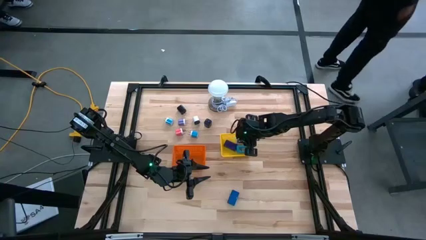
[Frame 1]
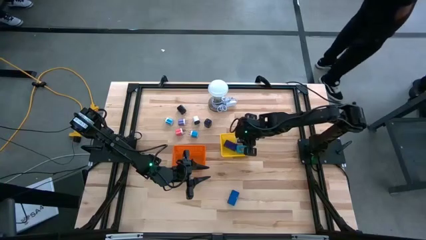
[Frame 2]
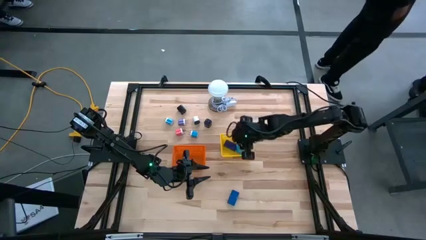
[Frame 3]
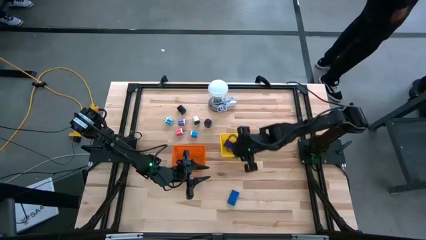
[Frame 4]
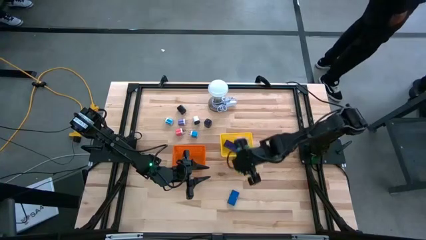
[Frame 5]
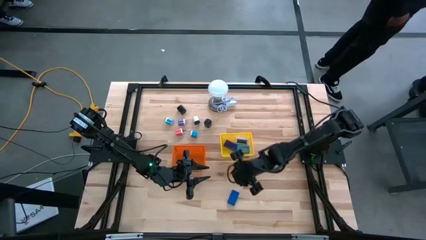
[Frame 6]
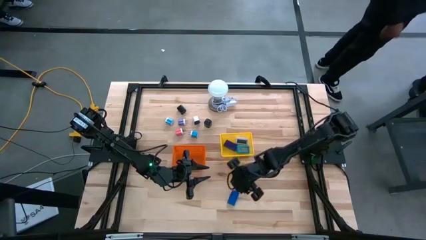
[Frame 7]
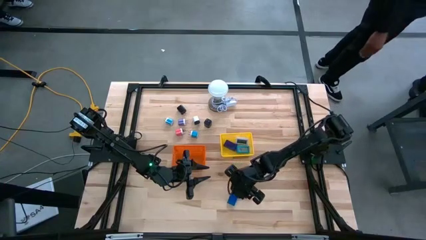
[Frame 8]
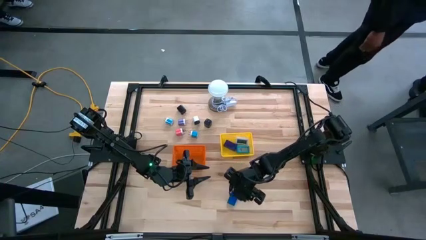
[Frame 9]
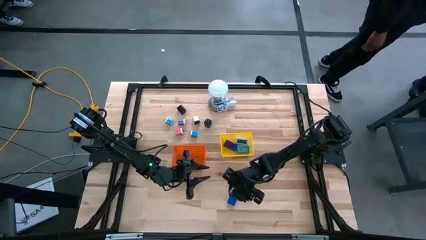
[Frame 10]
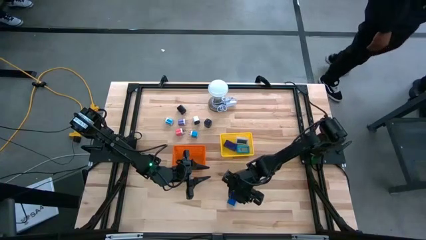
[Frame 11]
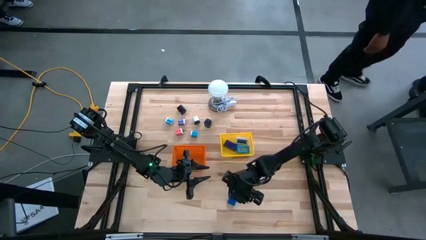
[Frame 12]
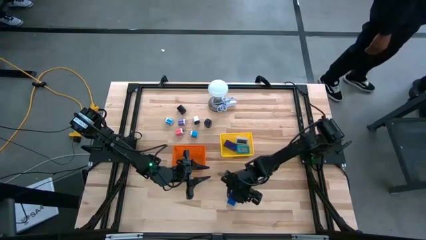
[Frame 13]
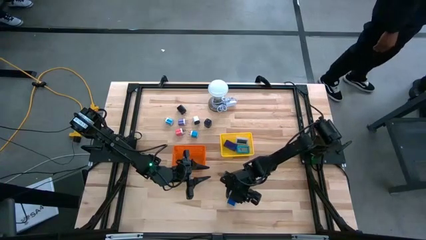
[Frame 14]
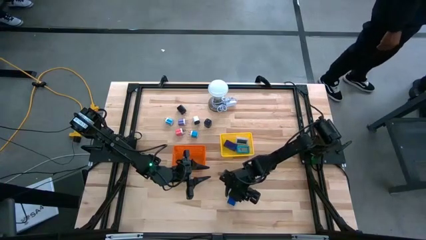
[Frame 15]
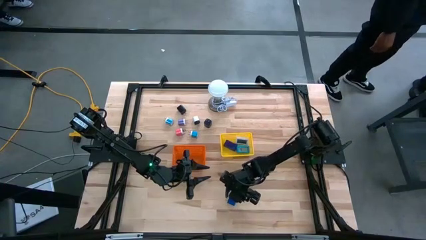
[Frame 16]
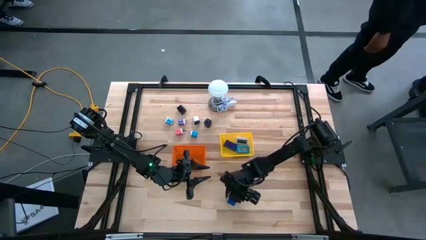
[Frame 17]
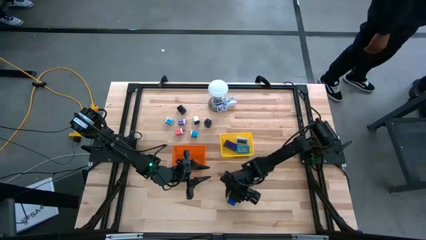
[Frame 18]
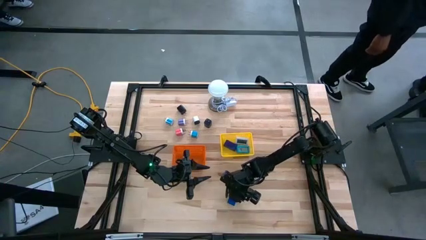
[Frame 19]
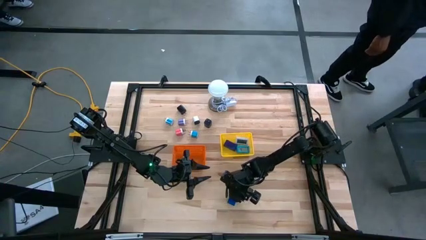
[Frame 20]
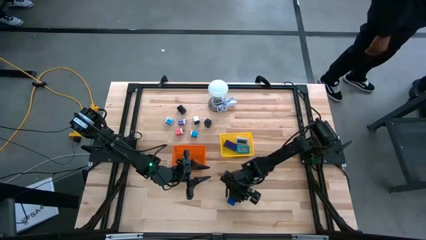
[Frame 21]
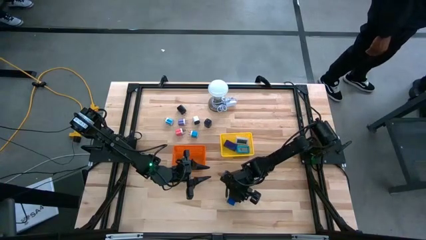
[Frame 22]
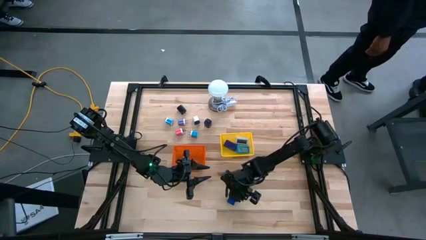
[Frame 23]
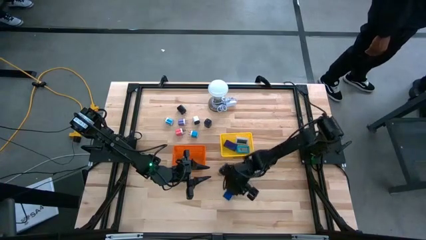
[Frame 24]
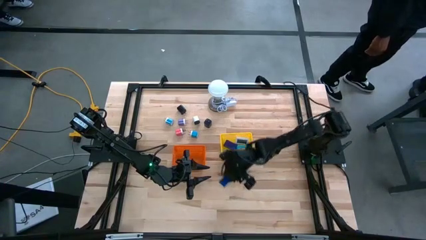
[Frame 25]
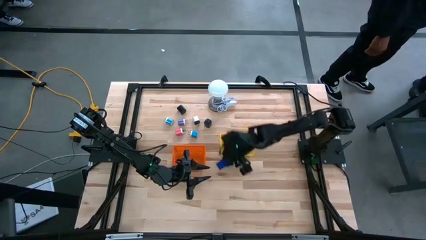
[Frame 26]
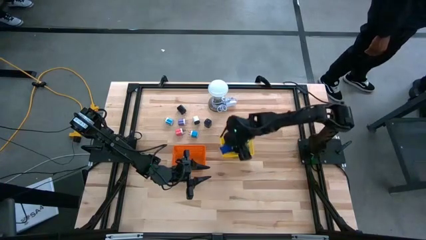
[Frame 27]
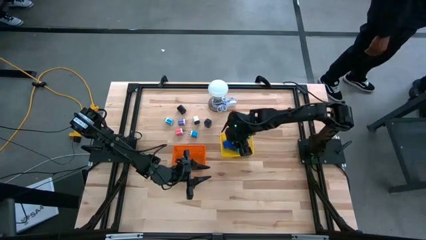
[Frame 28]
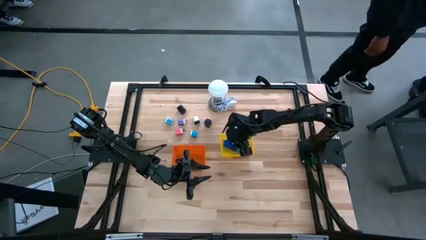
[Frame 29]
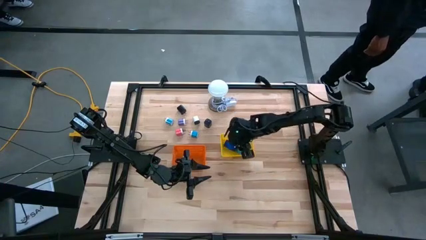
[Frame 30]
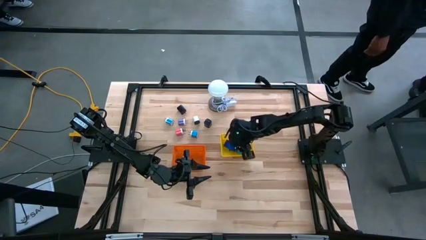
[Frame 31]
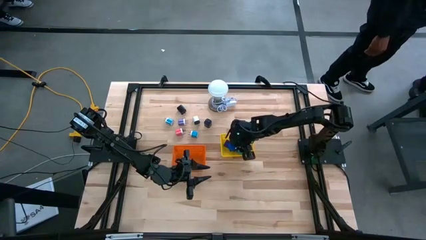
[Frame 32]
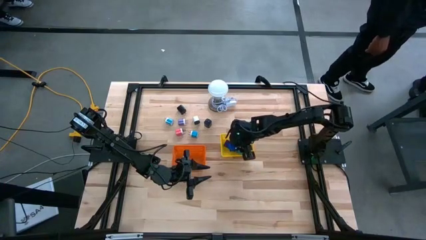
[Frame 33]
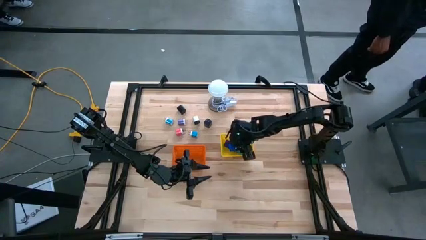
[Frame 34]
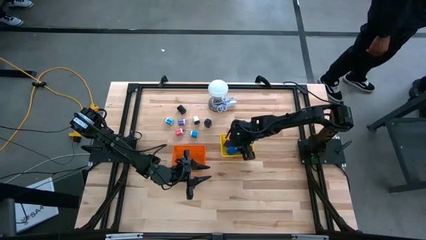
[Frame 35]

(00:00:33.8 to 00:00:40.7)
Task: Pick & Place Office items
Put the blue digital clock into the yellow bin

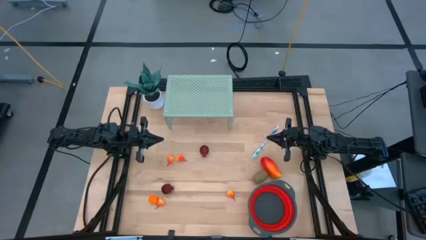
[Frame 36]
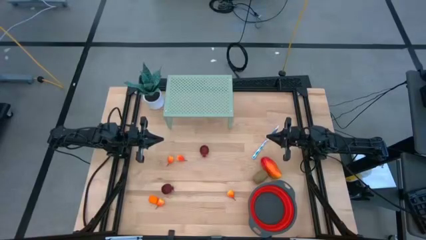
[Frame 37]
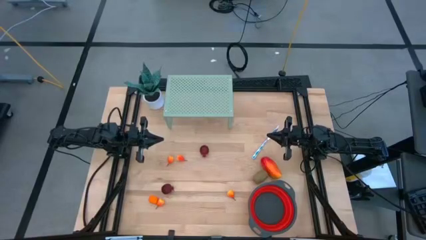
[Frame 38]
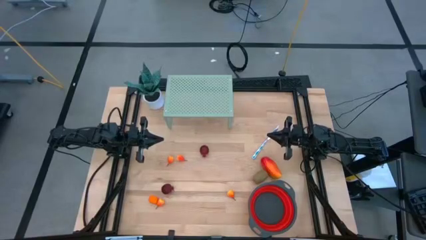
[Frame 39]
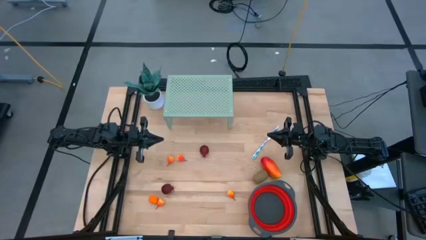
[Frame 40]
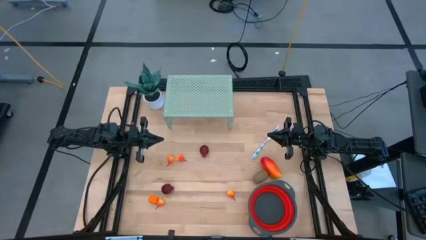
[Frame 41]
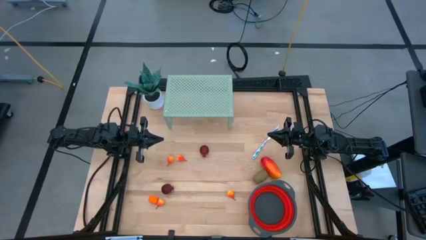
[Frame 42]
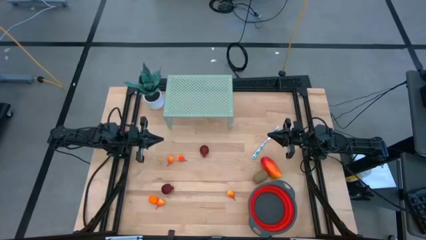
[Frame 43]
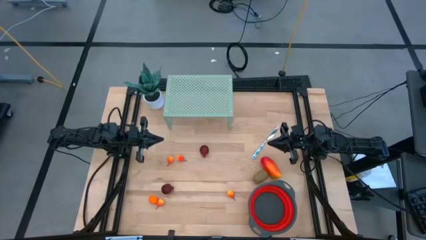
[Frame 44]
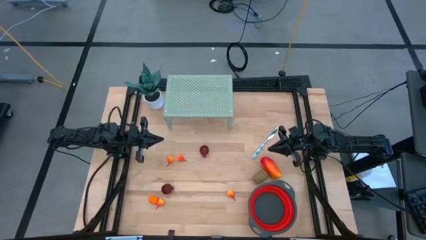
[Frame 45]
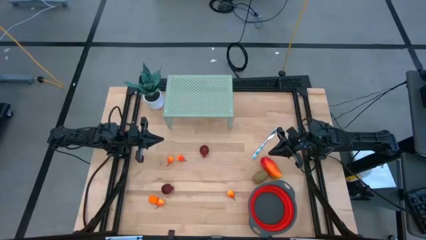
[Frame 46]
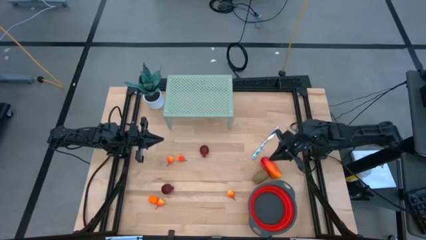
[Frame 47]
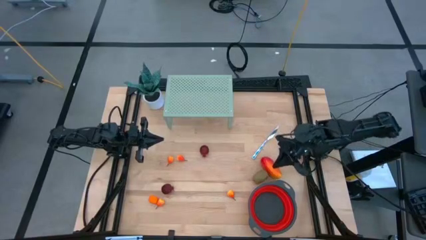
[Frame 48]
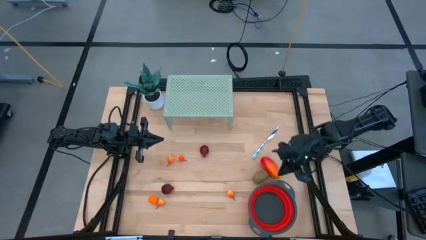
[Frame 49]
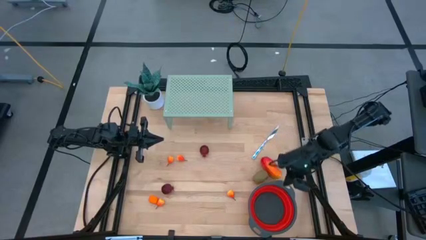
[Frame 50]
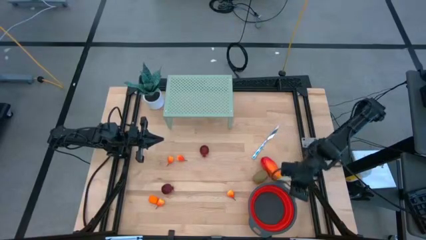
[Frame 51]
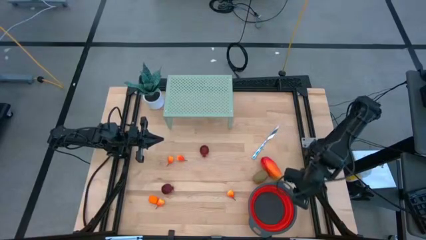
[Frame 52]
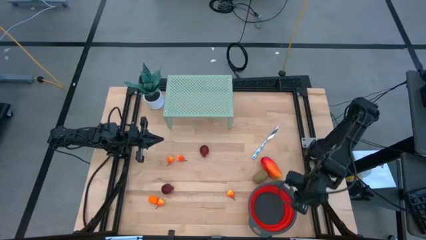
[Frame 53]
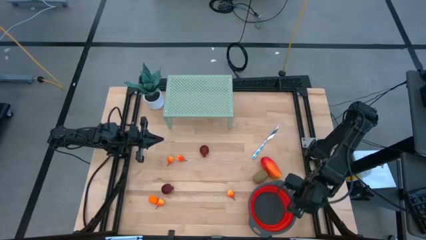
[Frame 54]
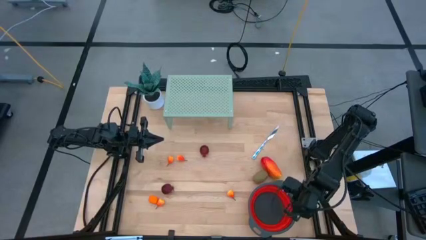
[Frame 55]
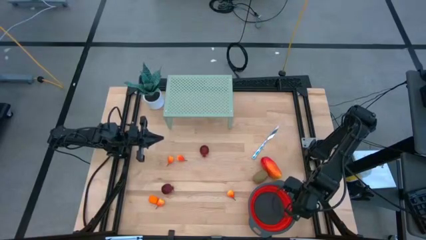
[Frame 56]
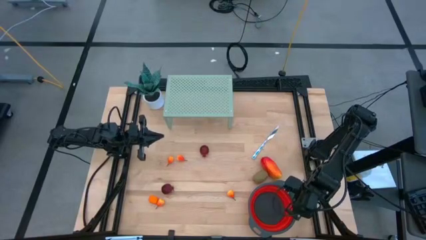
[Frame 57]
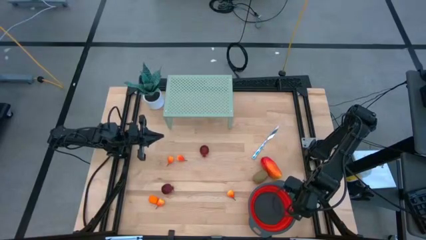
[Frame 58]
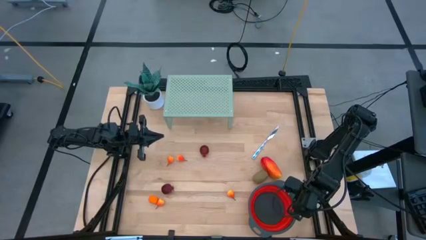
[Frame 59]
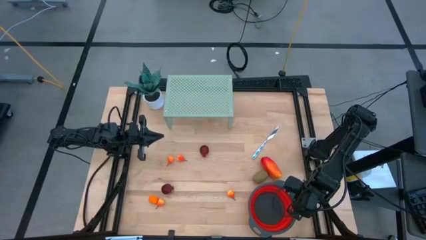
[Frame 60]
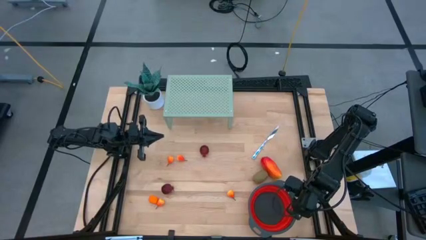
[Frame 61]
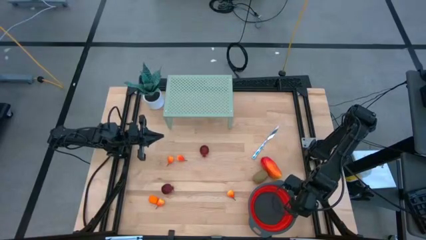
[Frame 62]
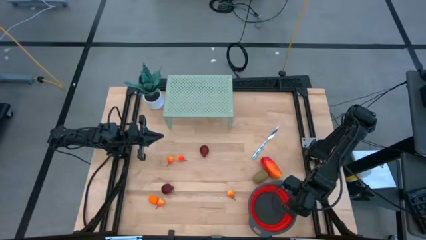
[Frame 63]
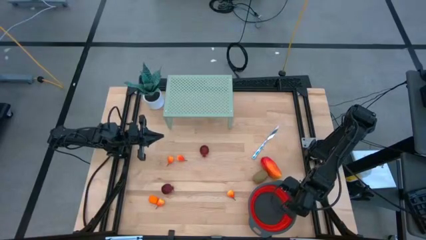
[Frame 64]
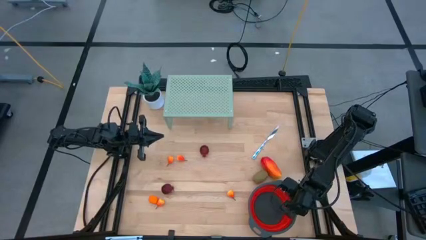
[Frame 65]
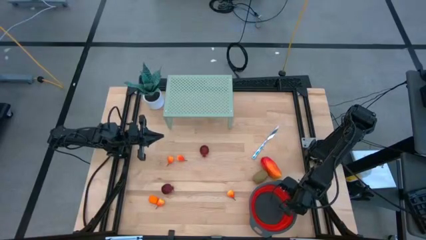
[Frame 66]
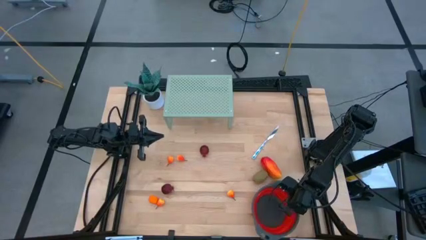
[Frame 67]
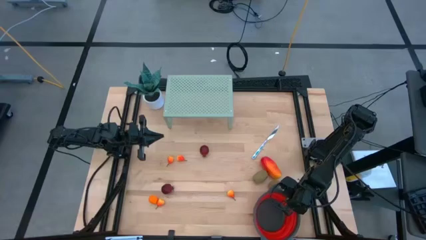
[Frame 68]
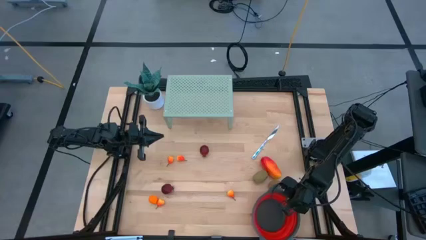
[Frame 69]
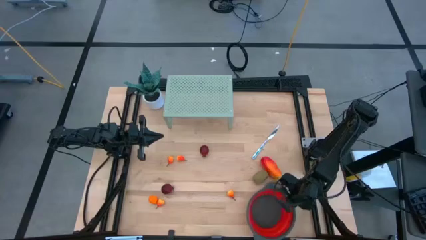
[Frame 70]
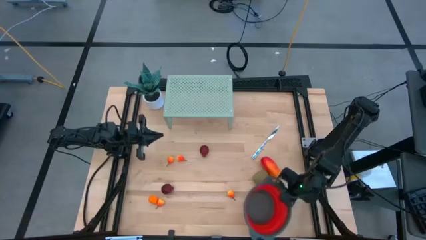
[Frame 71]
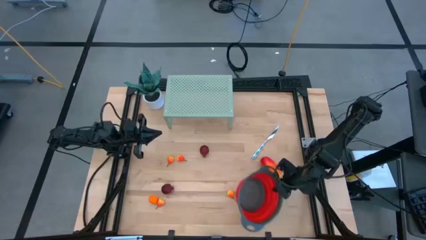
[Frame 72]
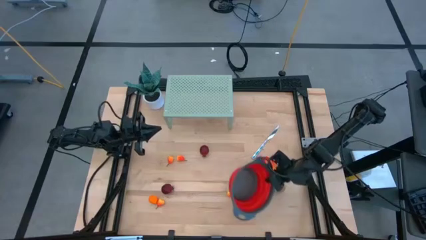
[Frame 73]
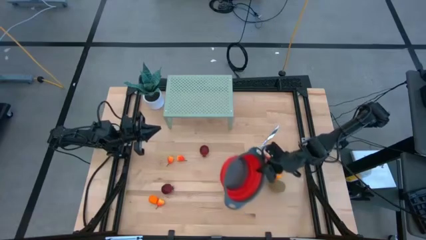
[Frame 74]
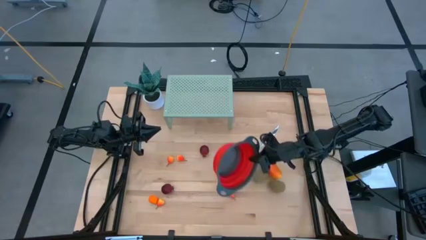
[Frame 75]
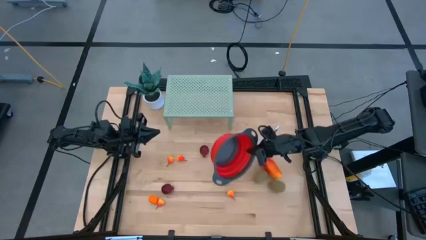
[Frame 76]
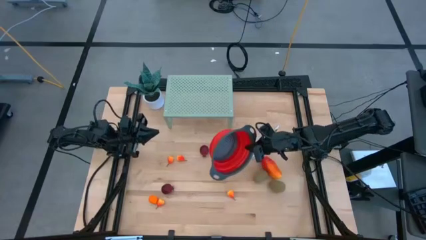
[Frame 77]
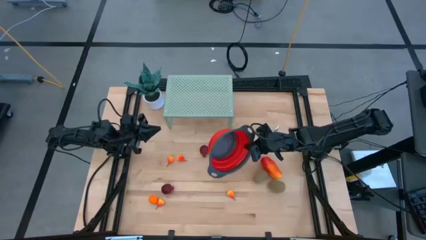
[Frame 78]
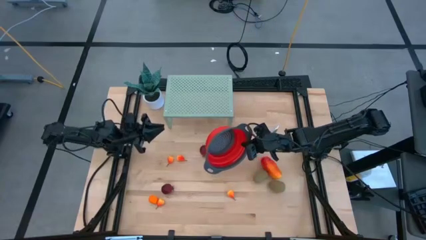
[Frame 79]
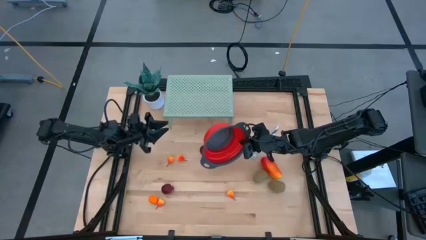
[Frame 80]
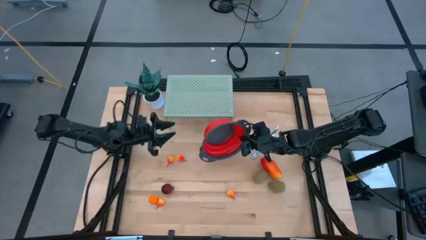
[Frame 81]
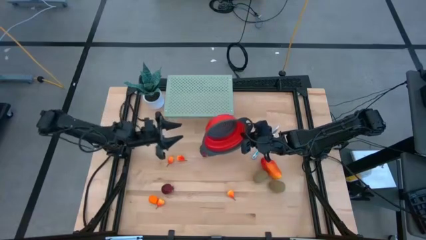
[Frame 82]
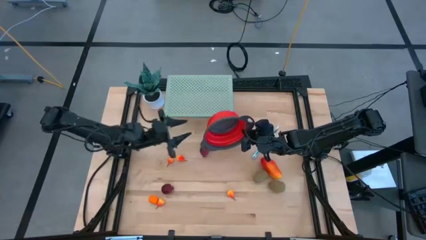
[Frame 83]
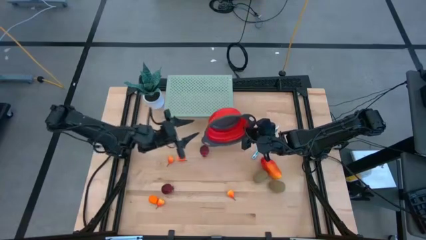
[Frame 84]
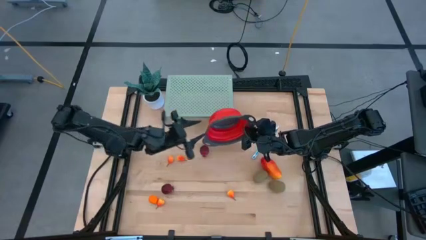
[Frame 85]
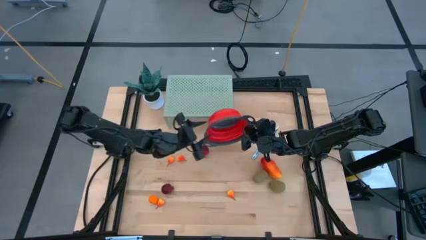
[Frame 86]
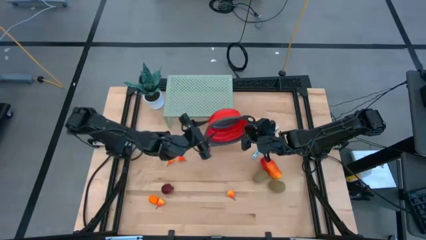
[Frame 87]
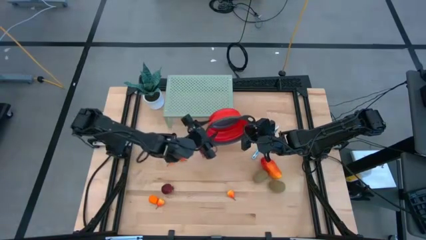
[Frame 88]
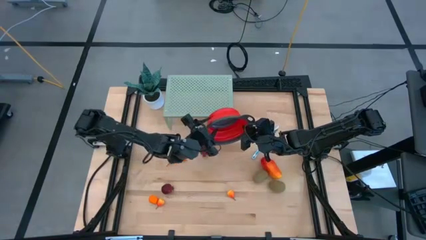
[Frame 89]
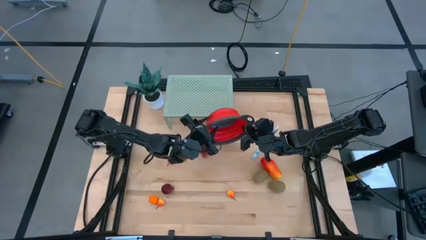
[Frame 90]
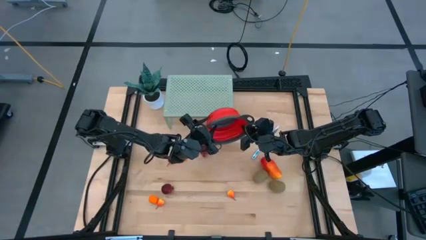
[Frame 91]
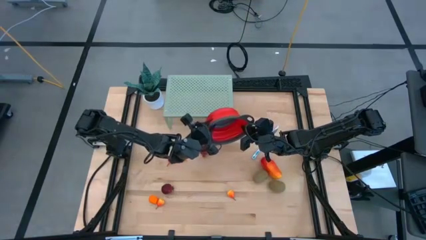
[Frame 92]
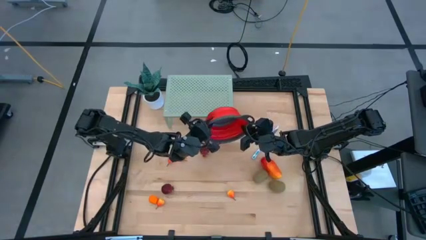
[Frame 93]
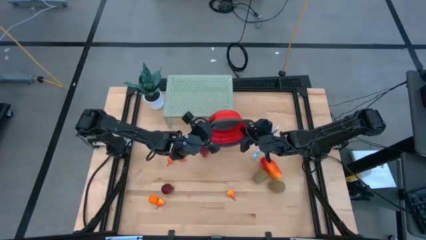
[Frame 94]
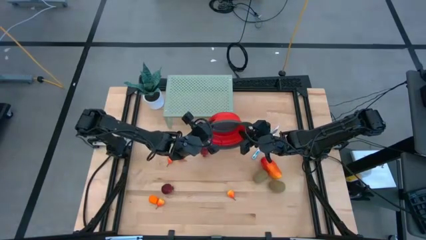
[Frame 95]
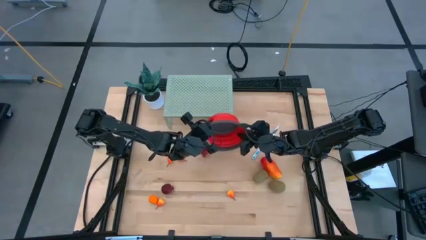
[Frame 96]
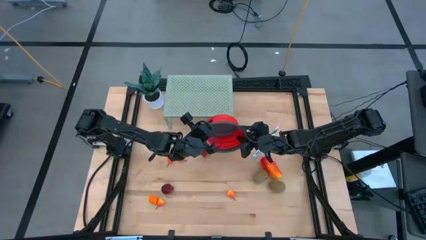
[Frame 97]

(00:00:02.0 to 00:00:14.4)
Task: Pick & Place Fruit
Put the red strainer bowl on the shelf
